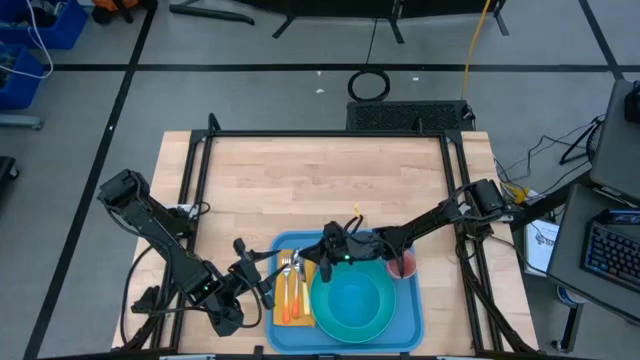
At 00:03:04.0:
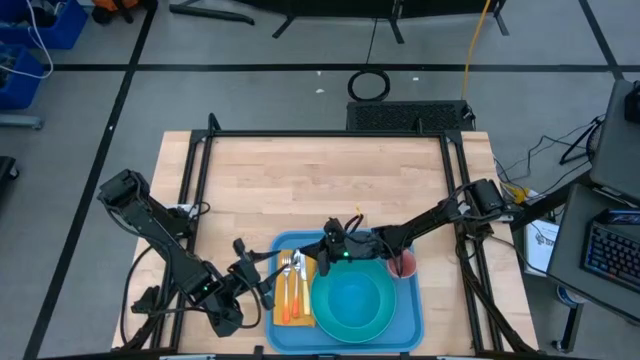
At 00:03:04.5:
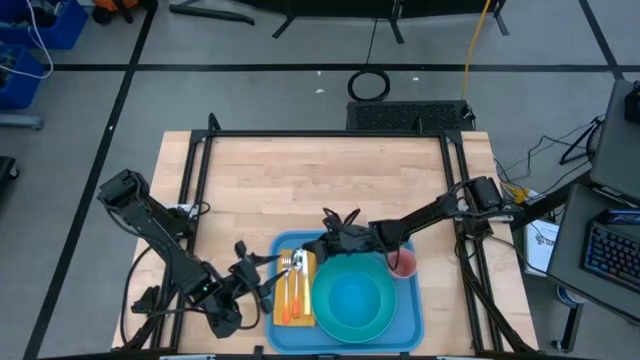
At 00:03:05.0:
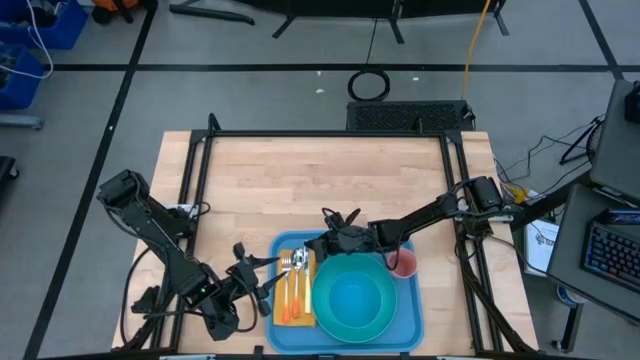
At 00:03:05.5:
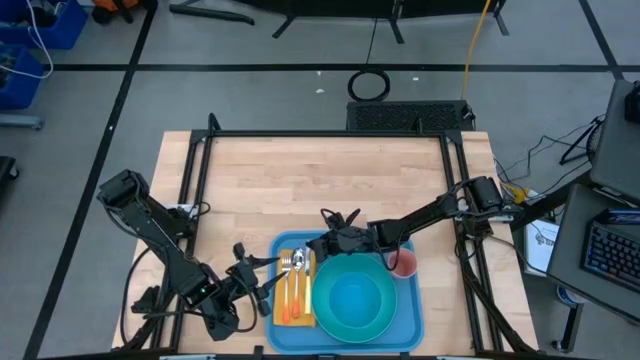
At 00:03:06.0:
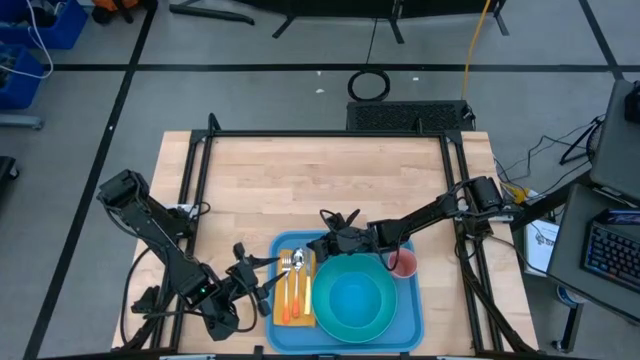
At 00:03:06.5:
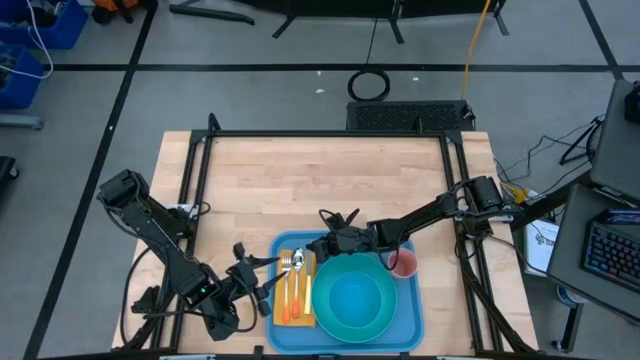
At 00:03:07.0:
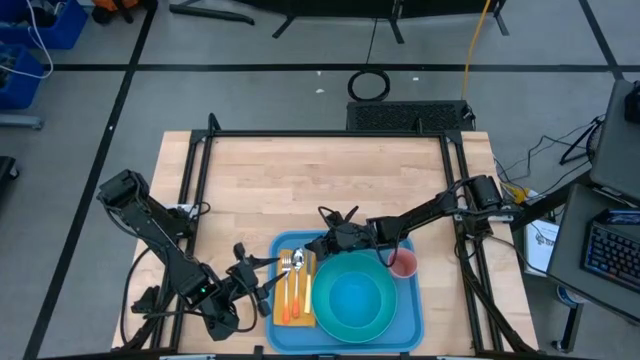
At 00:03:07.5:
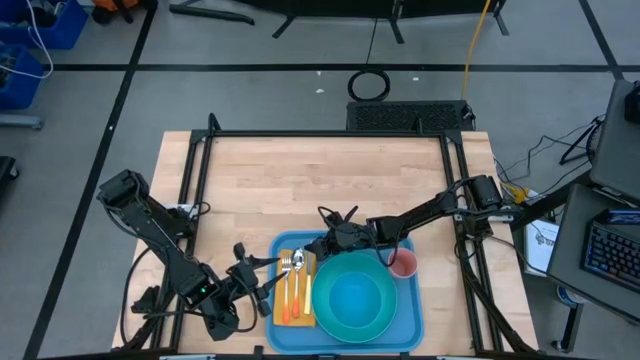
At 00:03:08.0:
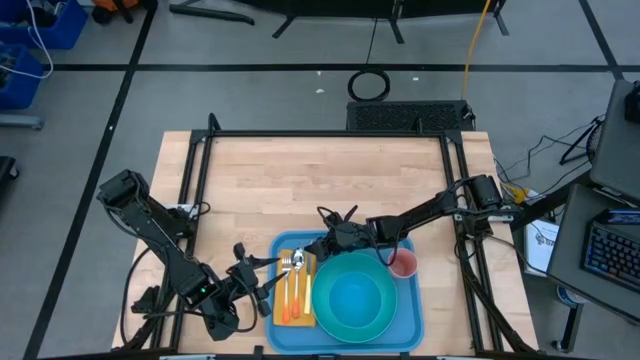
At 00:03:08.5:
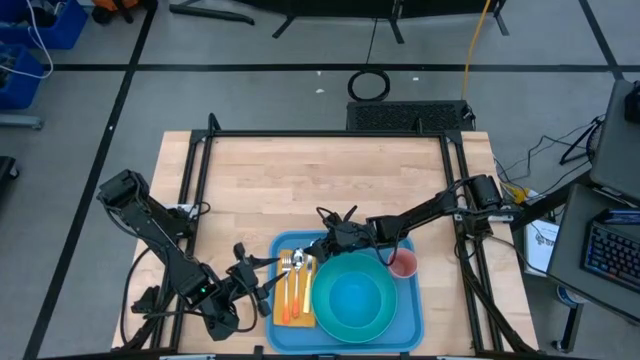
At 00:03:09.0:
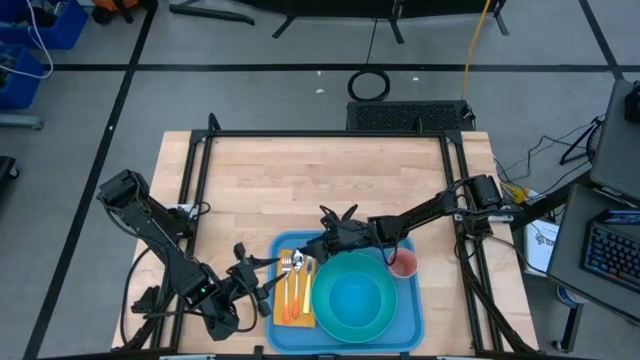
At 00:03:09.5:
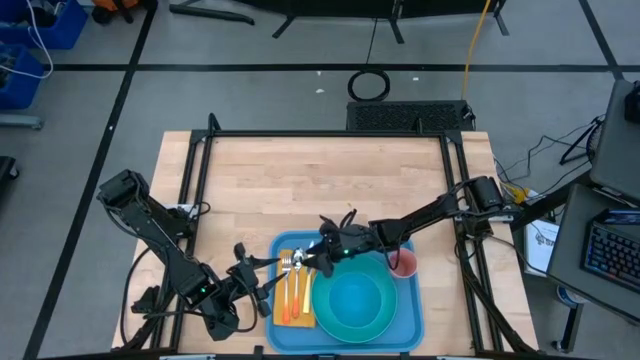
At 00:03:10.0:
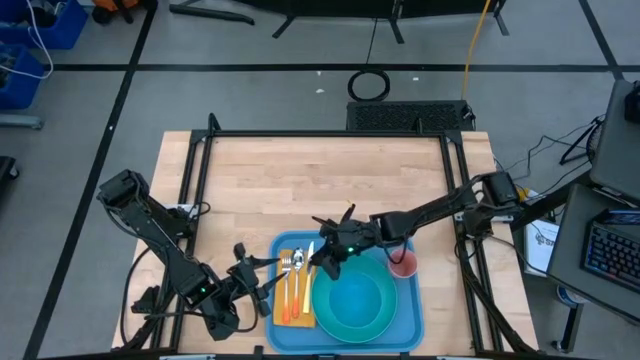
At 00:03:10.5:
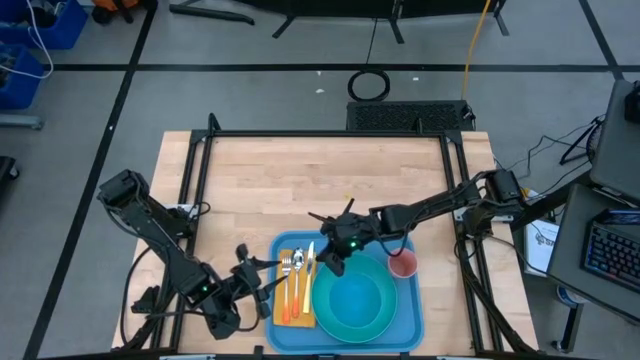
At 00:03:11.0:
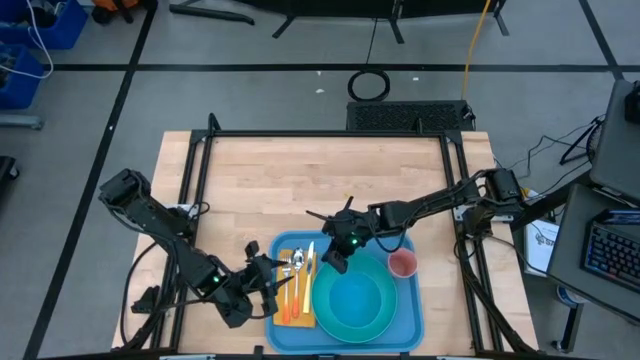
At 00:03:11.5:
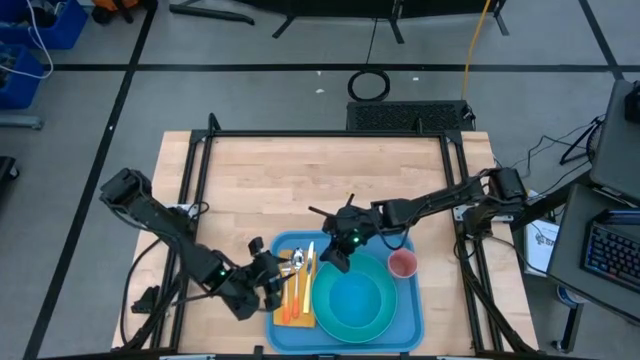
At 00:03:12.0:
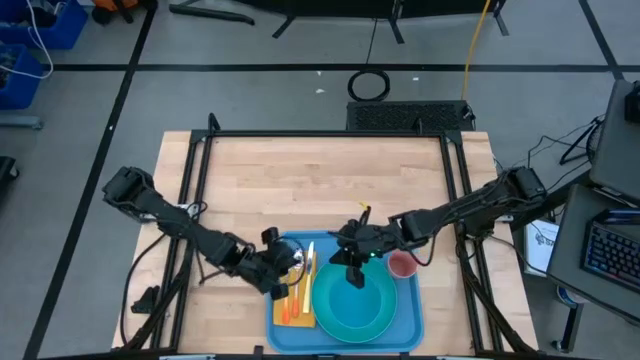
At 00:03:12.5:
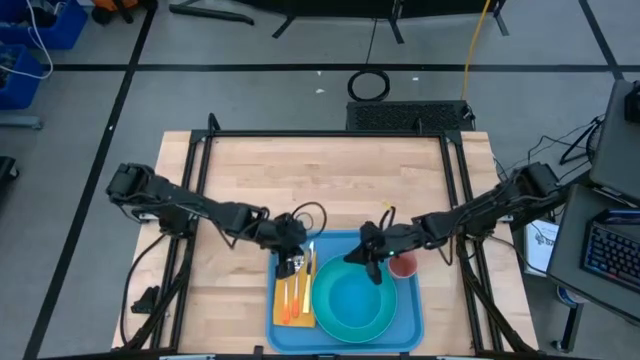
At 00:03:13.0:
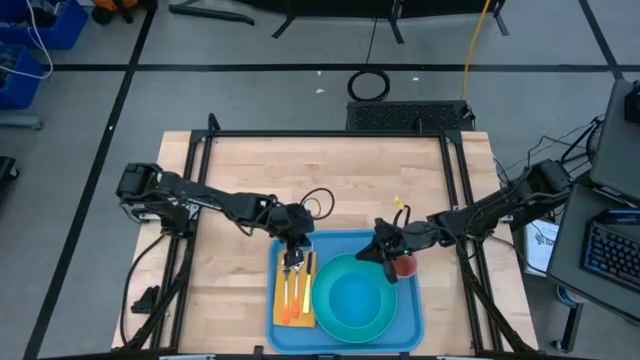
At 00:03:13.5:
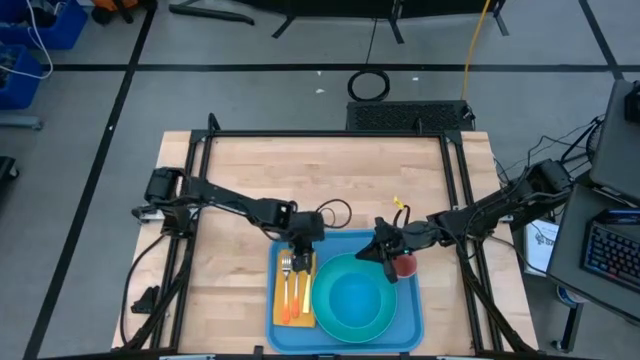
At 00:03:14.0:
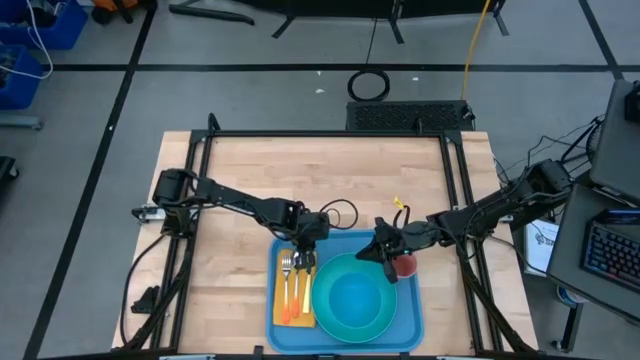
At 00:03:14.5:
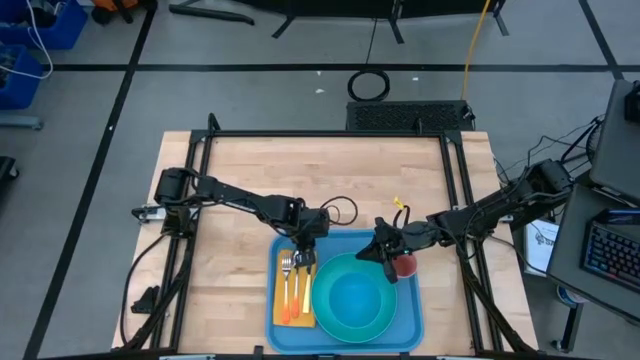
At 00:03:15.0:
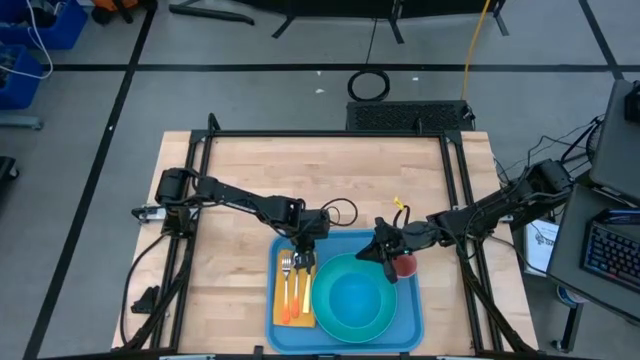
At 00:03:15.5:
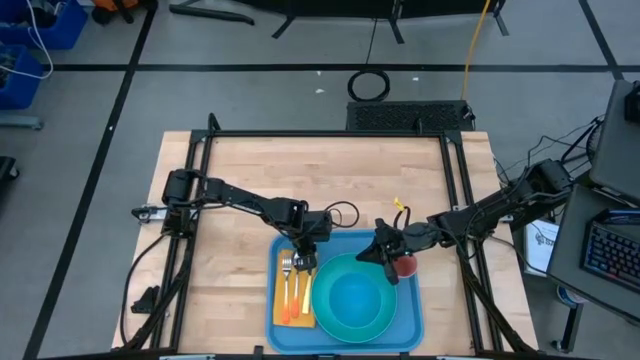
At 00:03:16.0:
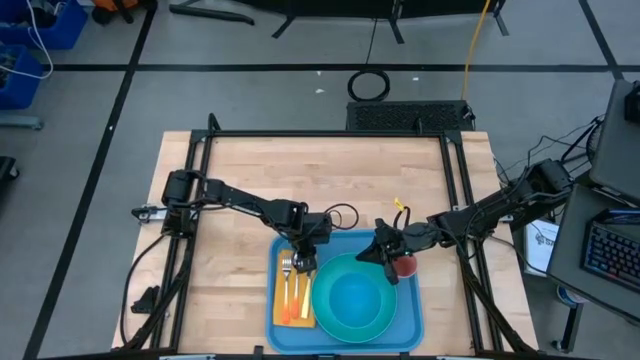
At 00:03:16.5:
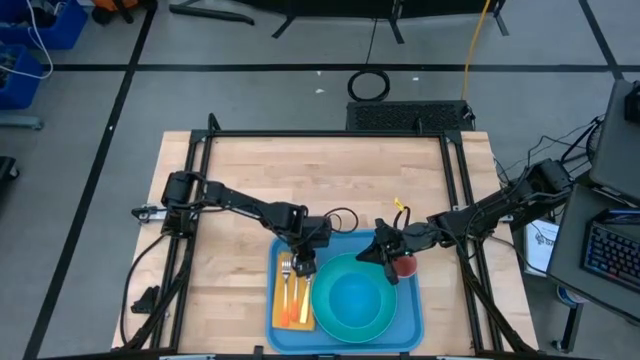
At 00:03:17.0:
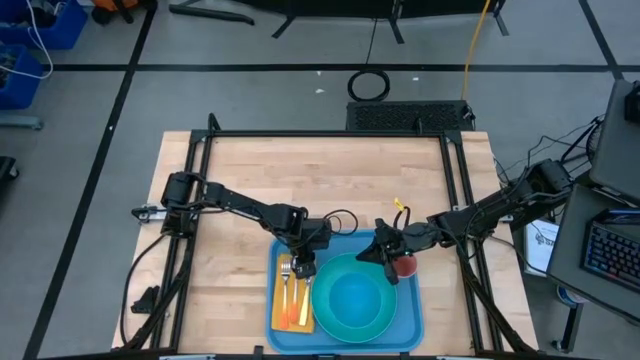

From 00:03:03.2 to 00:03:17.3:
Task: Set up tray
Put the yellow table knife on top of the yellow table napkin to the right of the orange spoon

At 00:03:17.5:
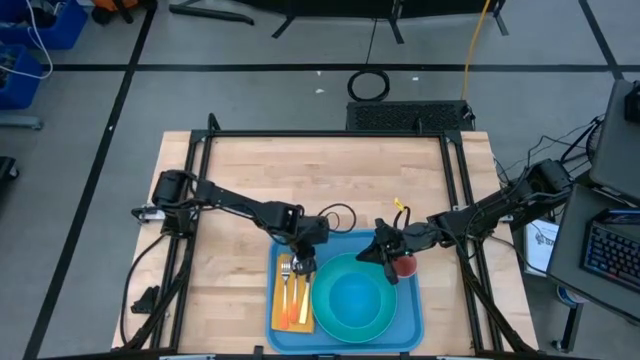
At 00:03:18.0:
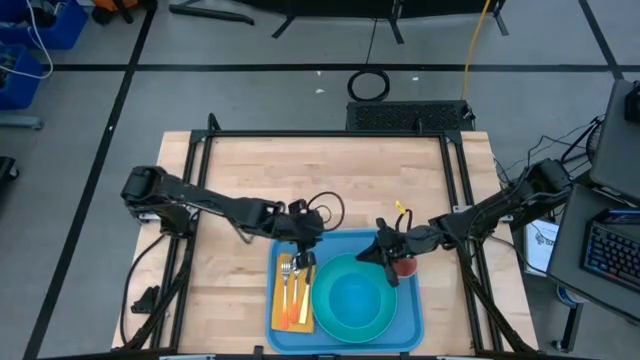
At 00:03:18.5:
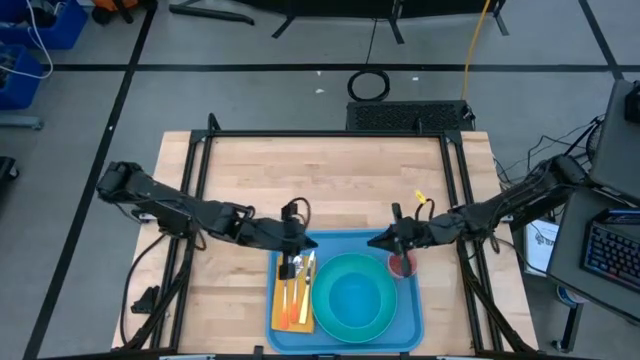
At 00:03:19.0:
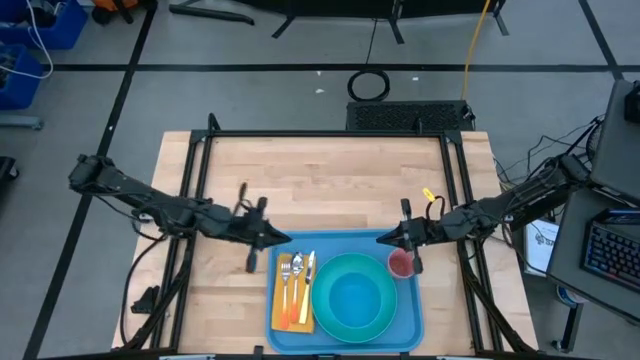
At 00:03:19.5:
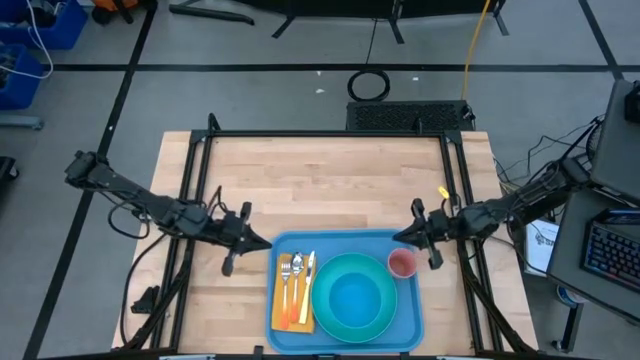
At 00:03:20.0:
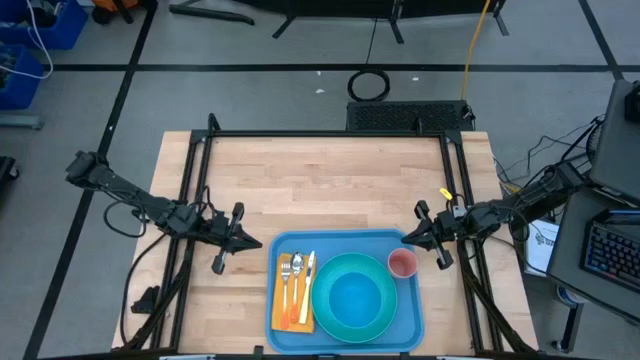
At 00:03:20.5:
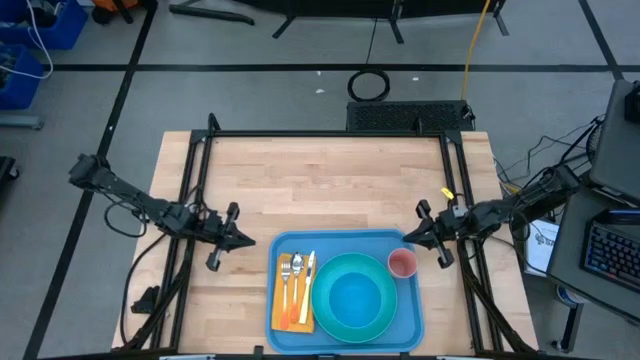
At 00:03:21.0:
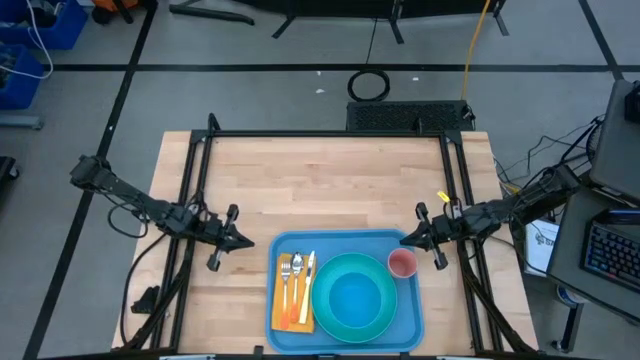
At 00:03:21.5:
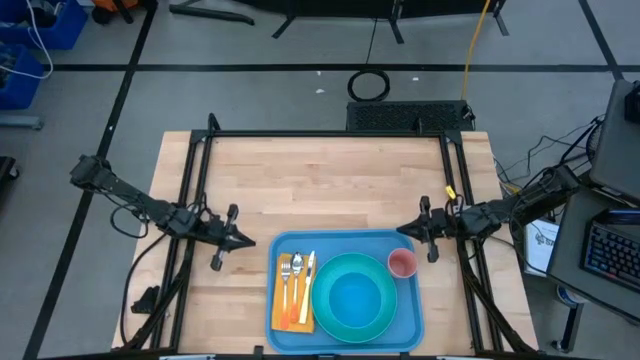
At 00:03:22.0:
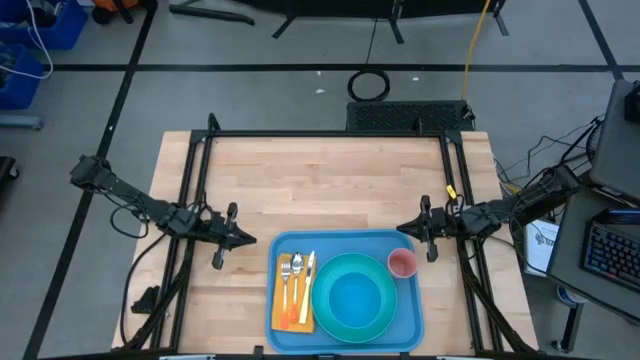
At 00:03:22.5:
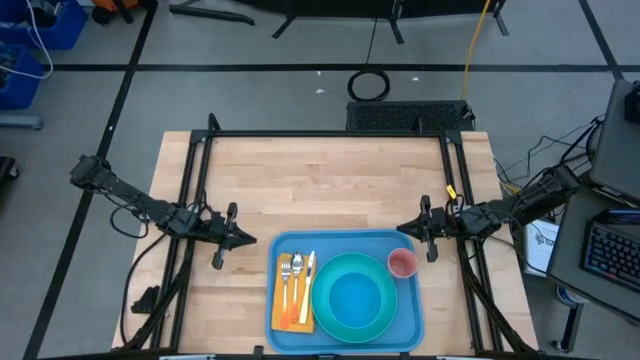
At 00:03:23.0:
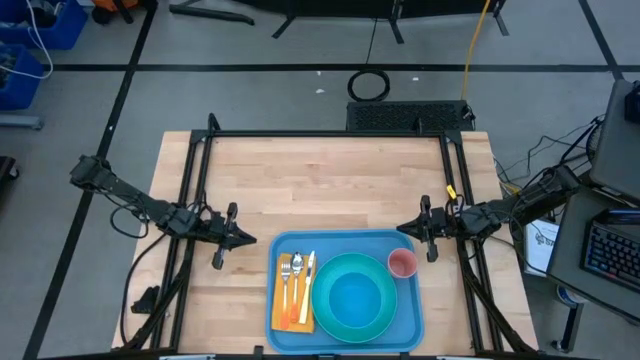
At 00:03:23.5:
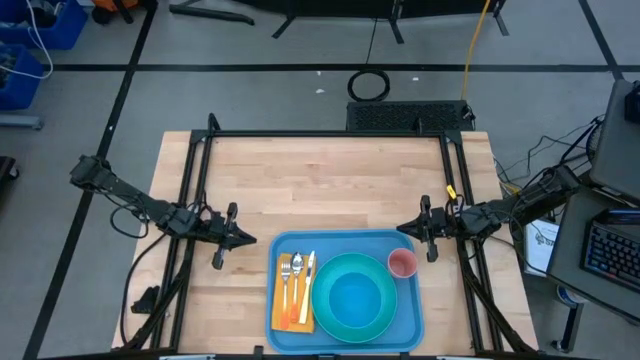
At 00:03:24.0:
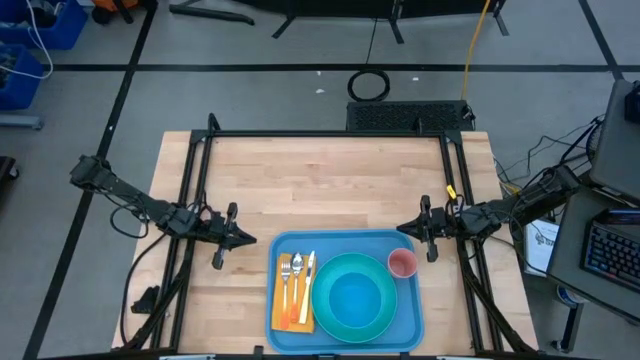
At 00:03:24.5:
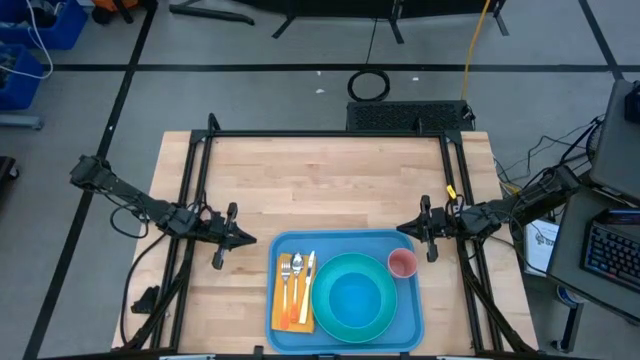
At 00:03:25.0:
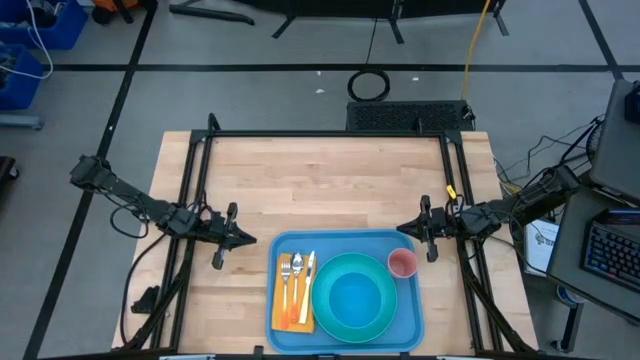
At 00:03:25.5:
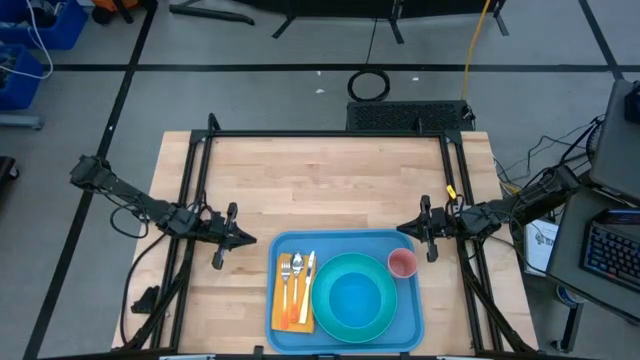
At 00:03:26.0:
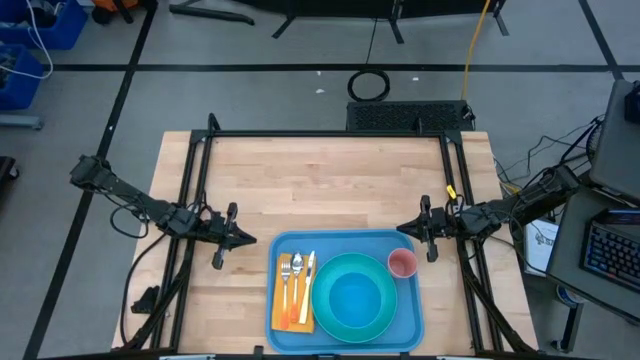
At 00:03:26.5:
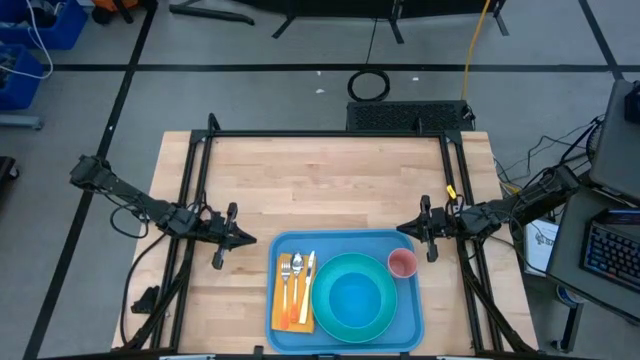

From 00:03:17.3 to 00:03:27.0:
Return to Home Position
